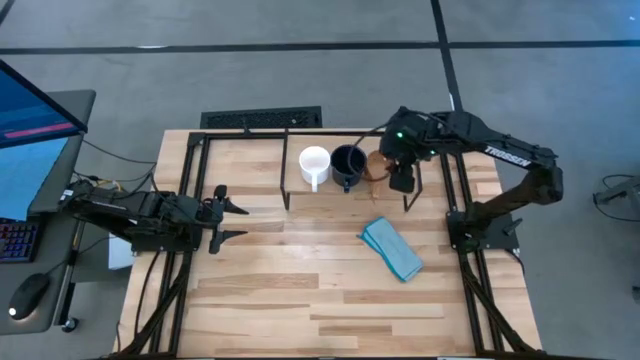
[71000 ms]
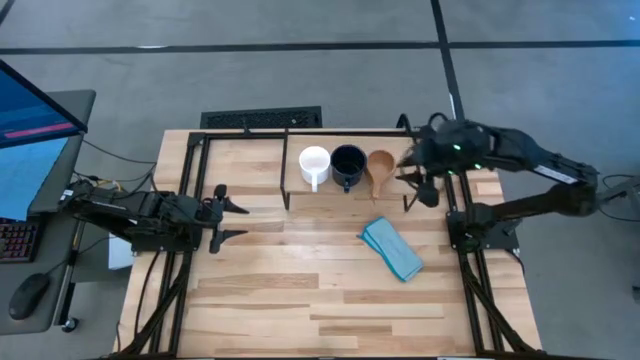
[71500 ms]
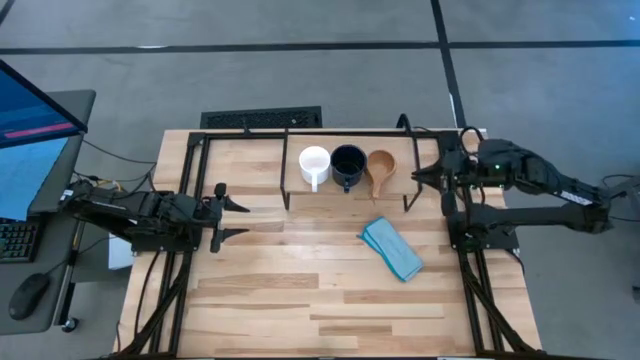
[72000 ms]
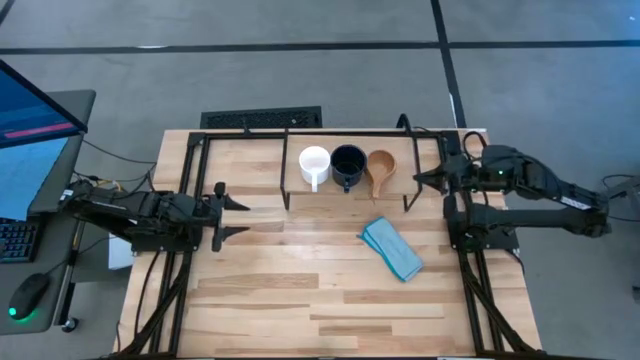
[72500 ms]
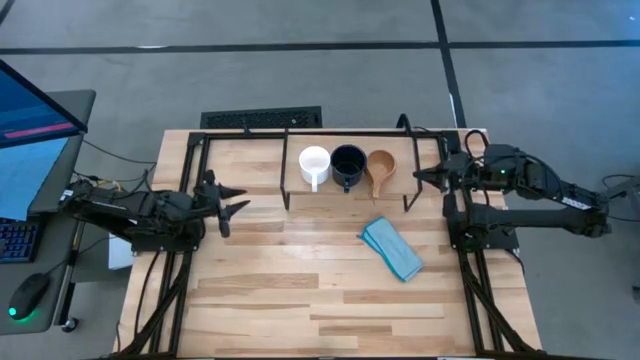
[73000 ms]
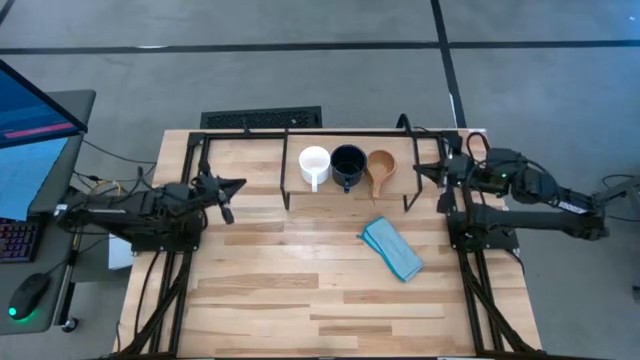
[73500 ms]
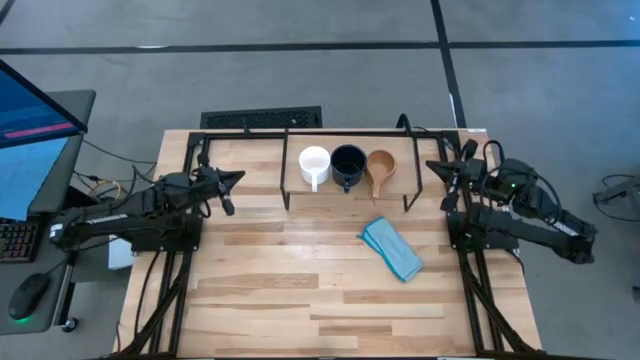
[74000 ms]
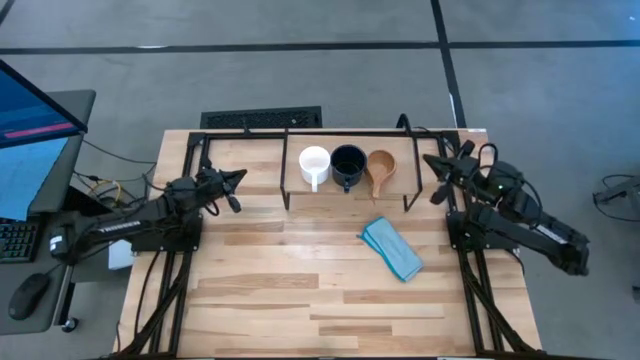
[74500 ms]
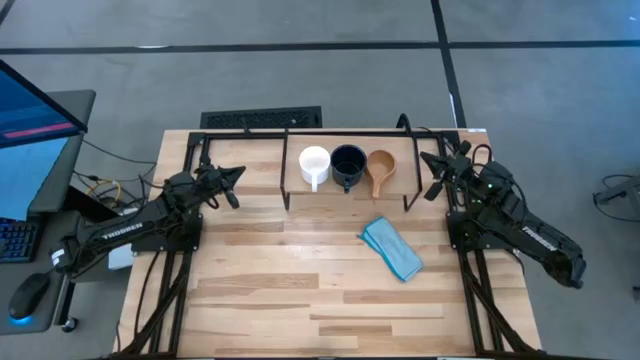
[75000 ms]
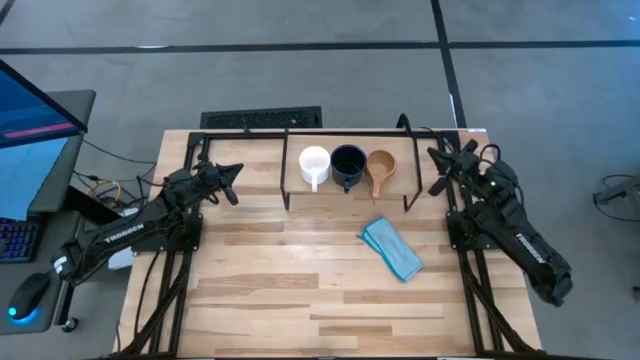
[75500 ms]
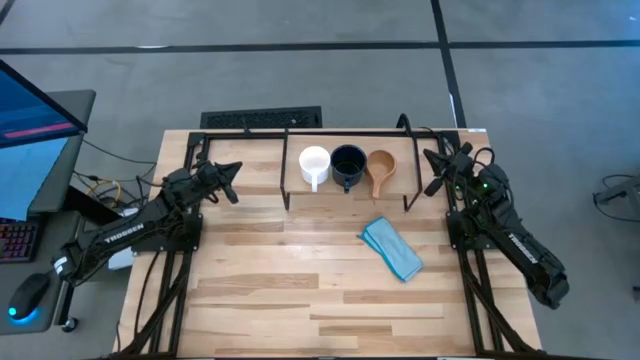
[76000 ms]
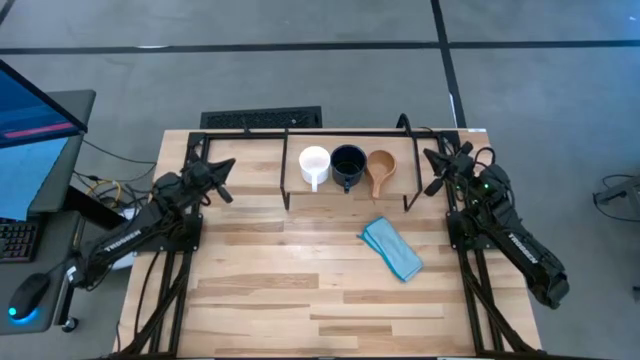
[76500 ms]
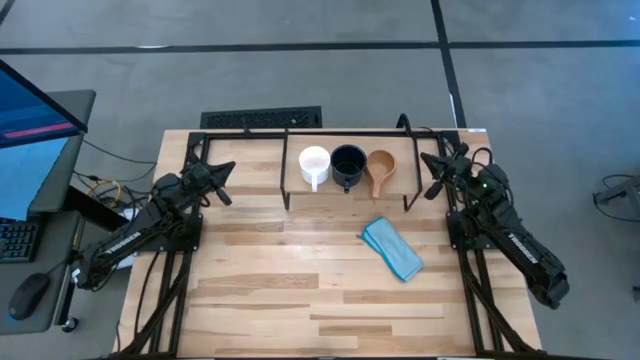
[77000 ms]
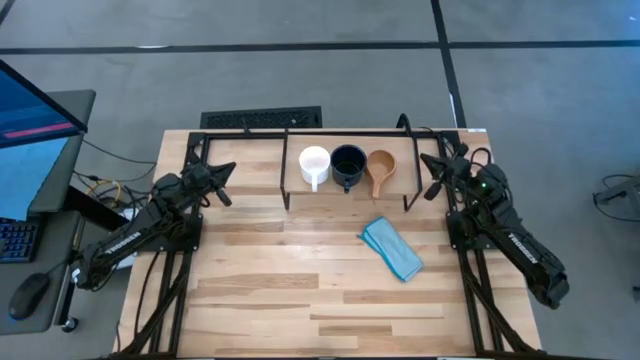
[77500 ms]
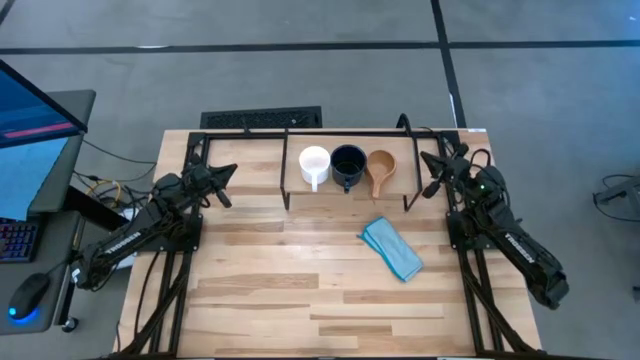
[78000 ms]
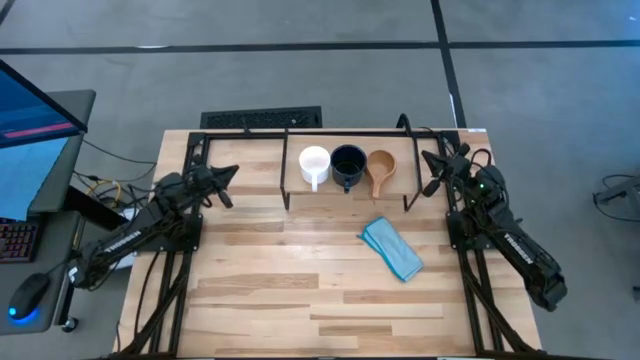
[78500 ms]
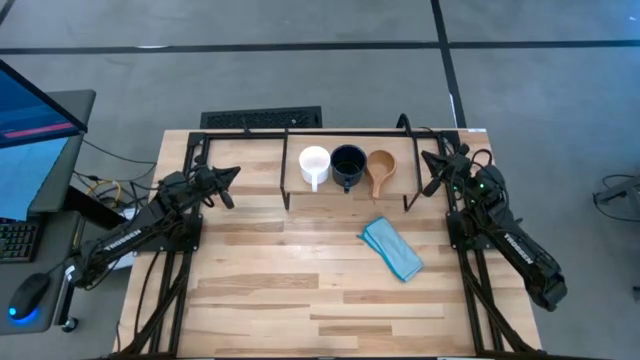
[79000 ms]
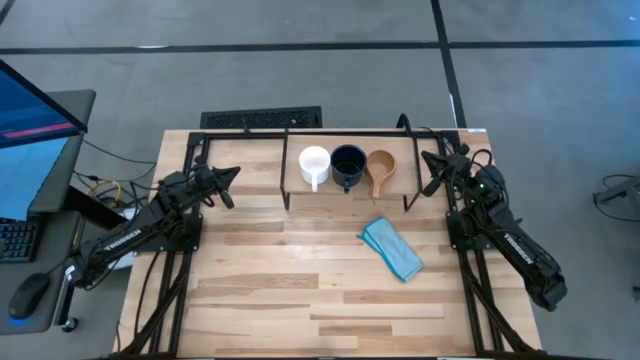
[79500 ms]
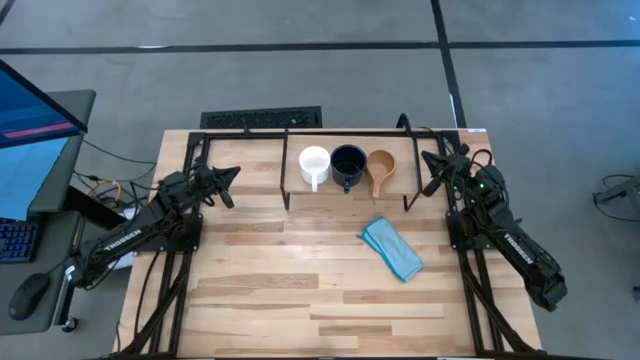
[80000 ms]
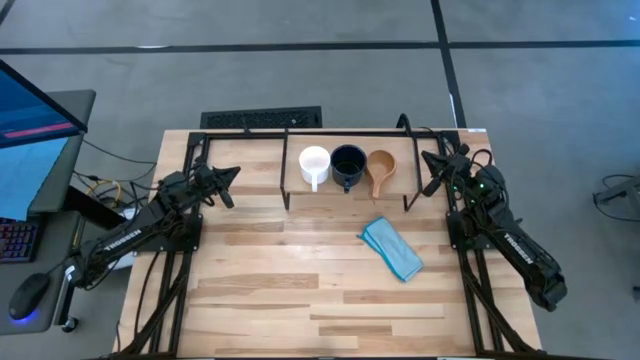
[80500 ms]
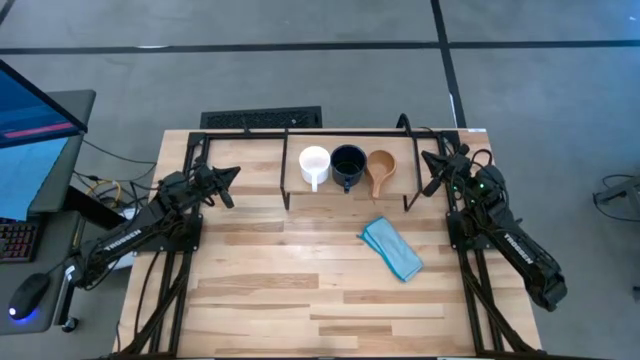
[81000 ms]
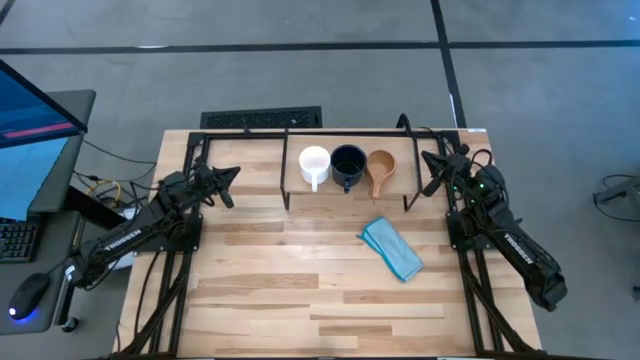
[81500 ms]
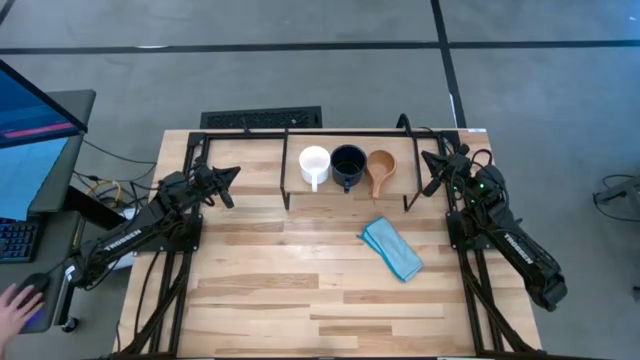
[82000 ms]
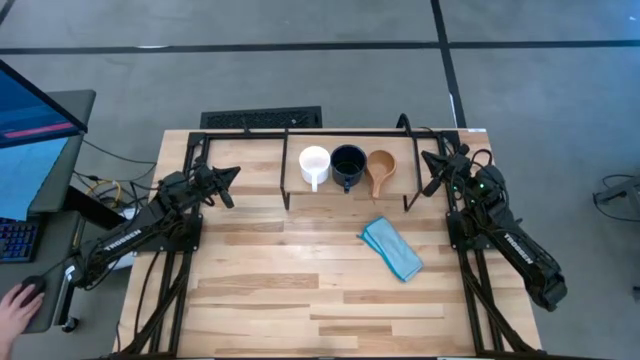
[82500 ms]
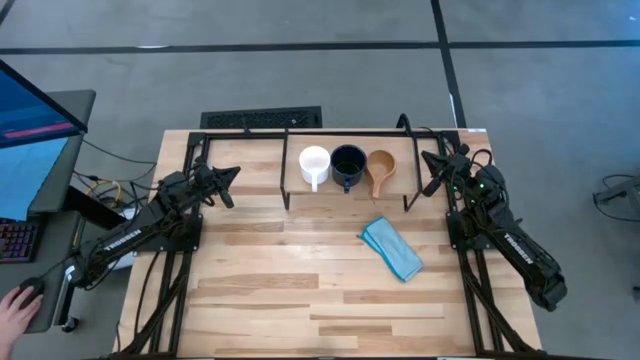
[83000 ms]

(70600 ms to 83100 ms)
Task: Stack small to large cups/mugs on shelf
Return to Home Position

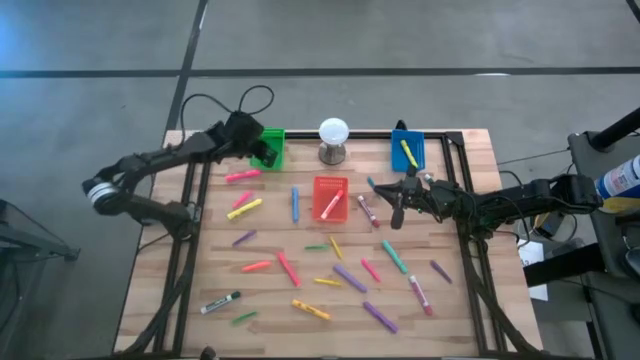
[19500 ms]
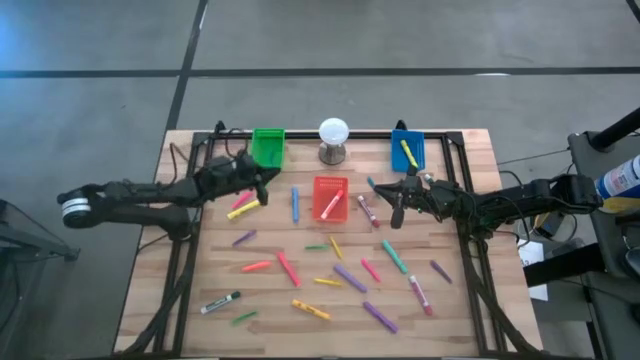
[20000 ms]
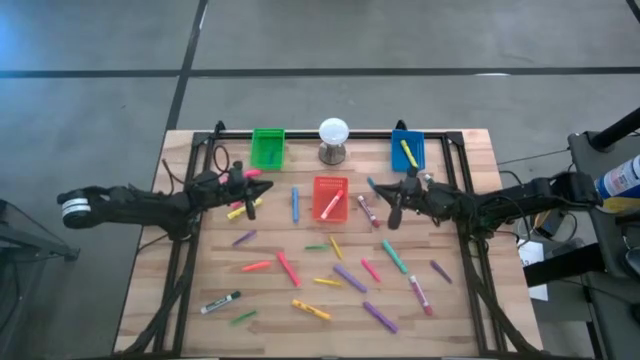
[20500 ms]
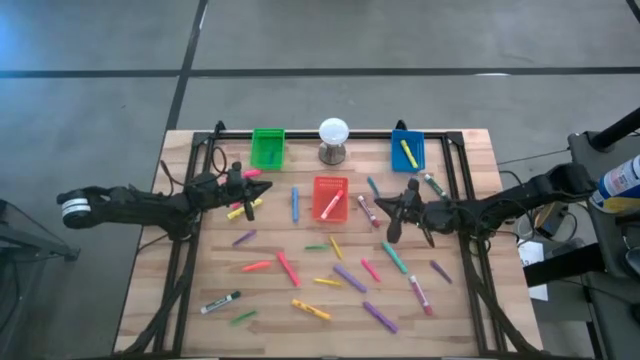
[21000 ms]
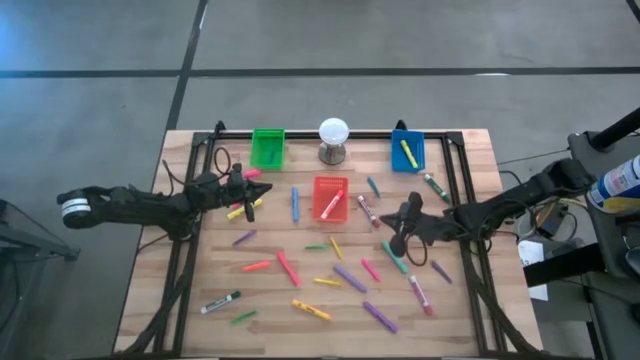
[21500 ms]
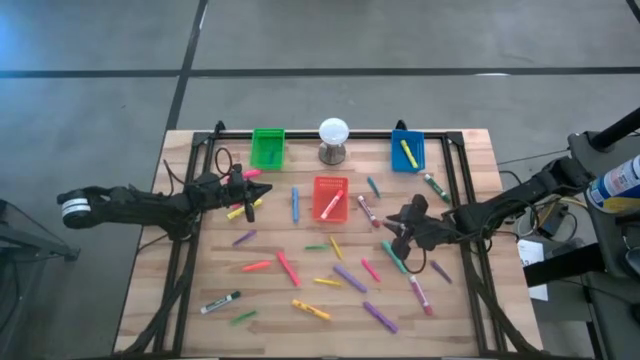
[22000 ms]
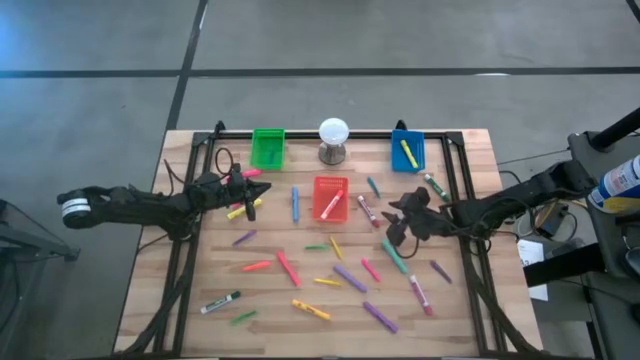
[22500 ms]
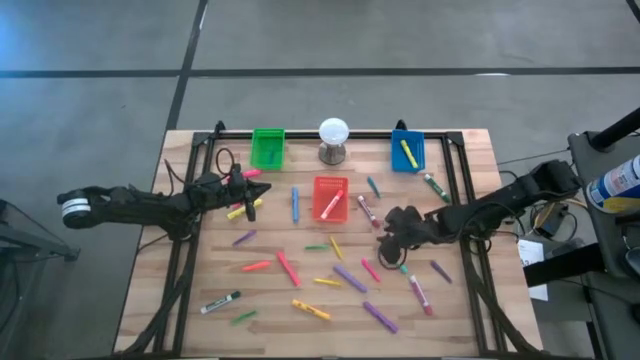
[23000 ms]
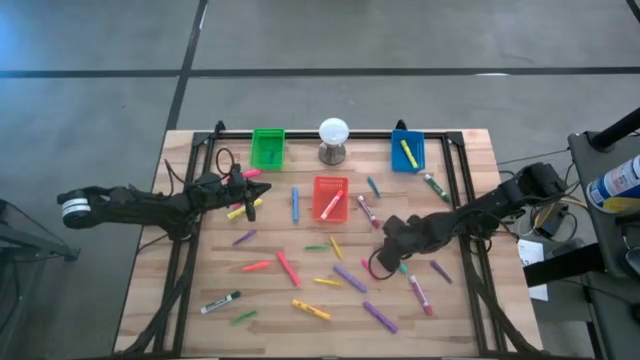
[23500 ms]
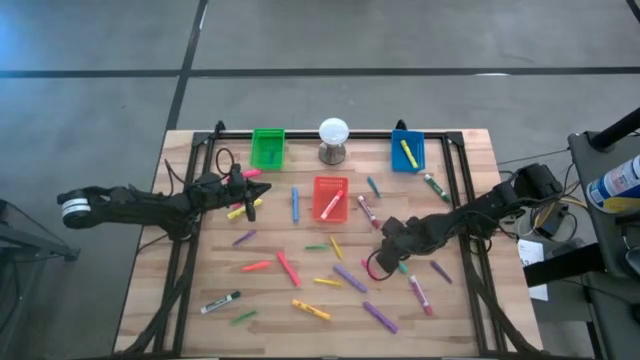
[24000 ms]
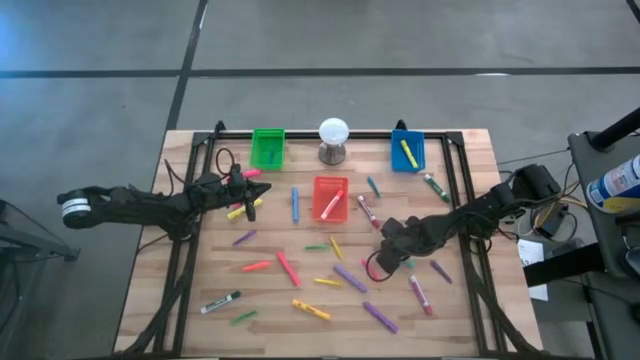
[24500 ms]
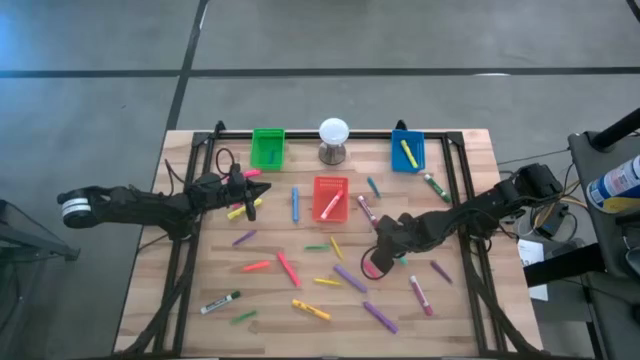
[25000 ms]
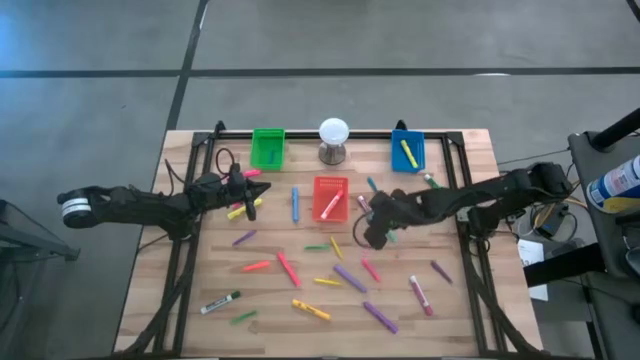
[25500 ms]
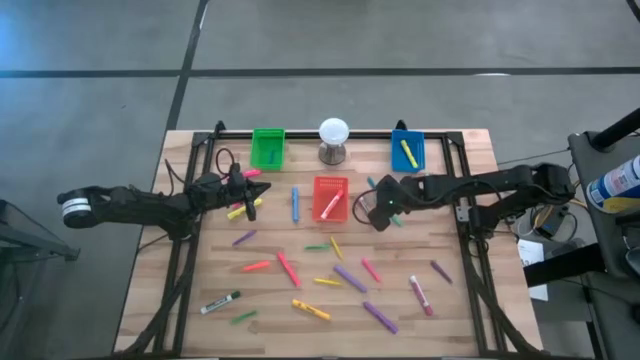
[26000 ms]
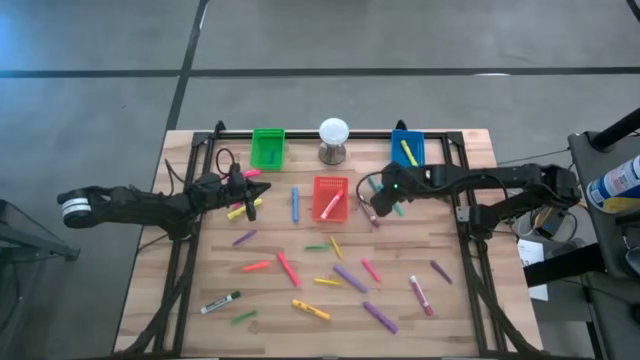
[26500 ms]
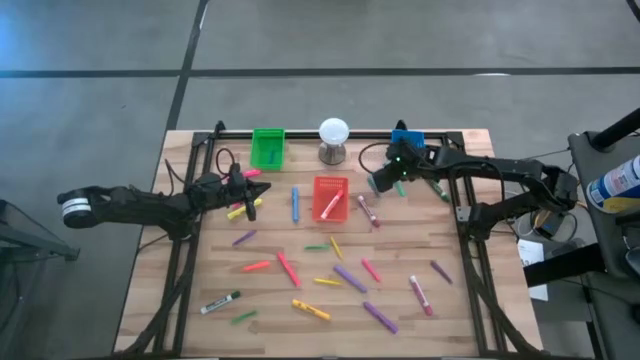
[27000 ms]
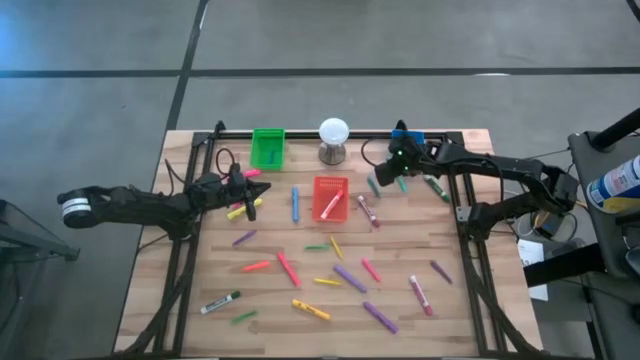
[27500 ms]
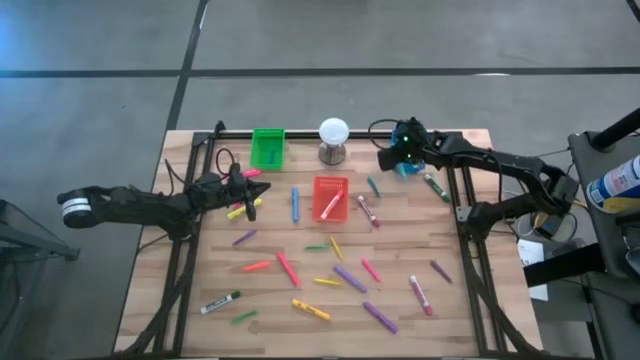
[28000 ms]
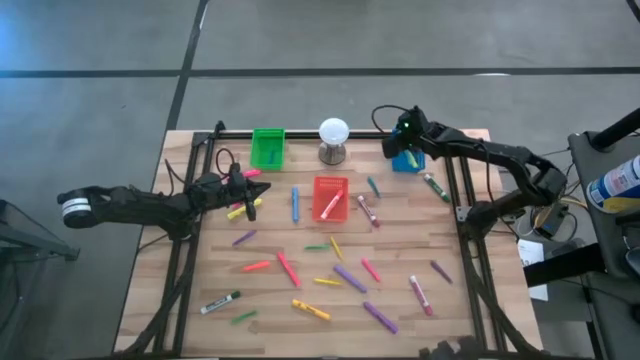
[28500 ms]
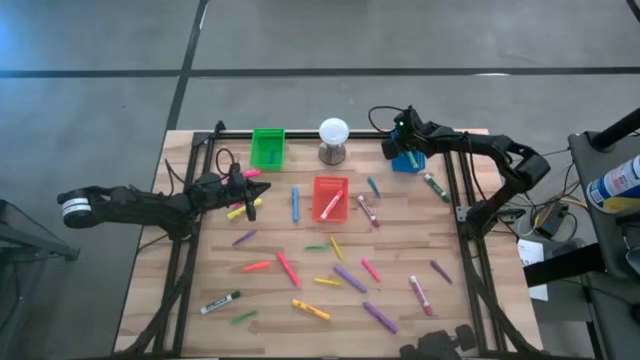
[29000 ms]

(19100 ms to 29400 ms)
Task: Pick & Place Markers
Put the light blue highlighter into the blue bin
